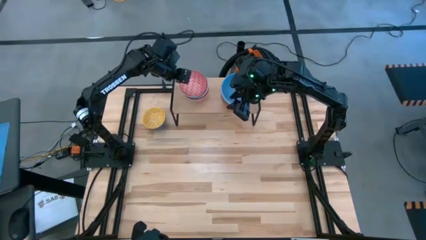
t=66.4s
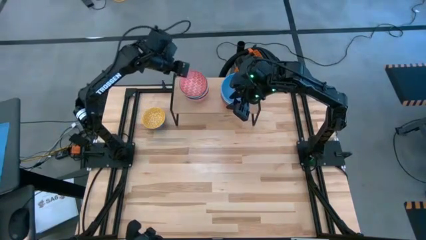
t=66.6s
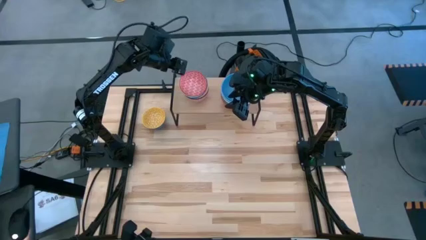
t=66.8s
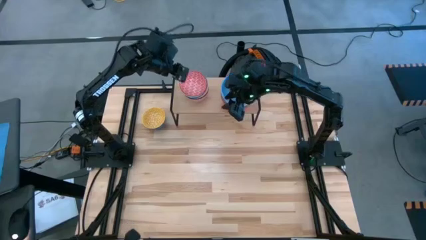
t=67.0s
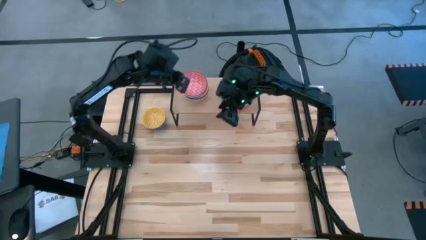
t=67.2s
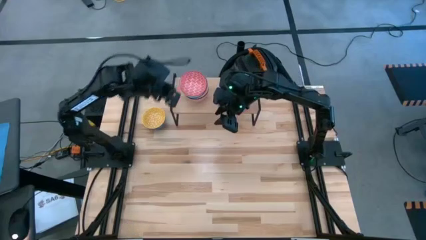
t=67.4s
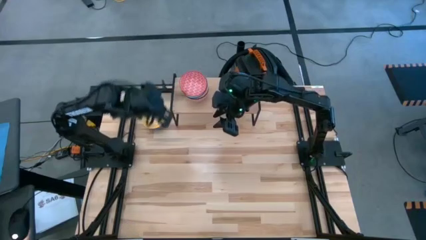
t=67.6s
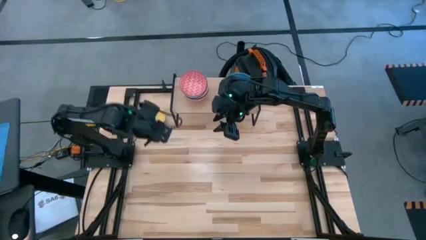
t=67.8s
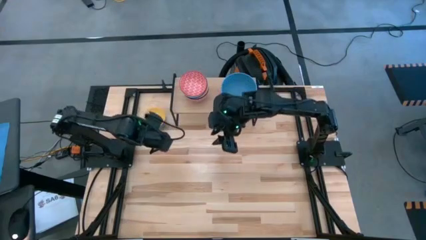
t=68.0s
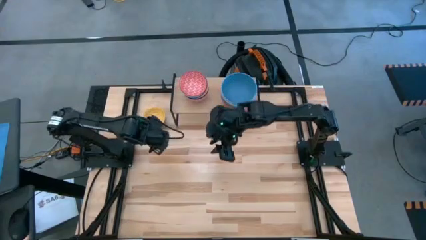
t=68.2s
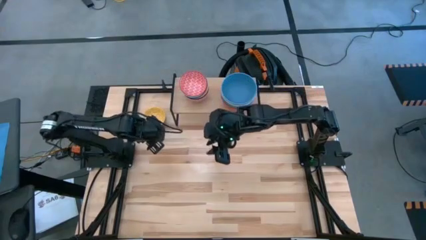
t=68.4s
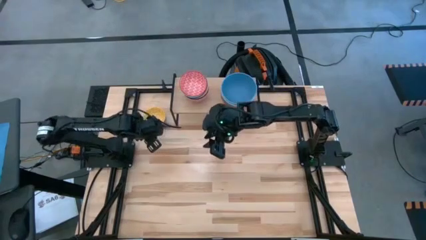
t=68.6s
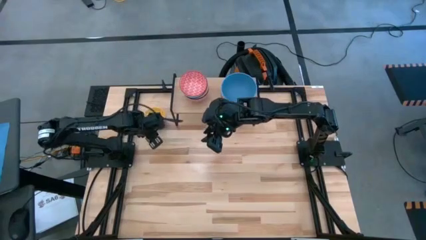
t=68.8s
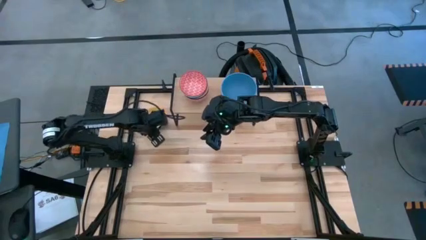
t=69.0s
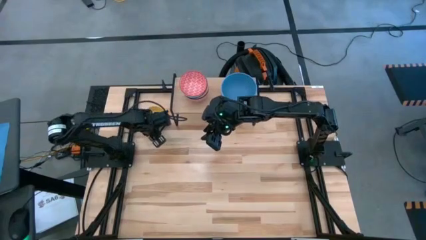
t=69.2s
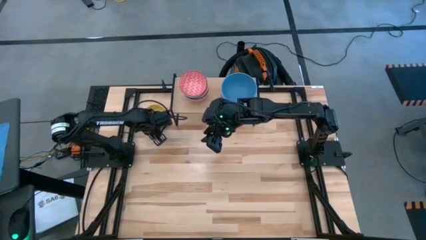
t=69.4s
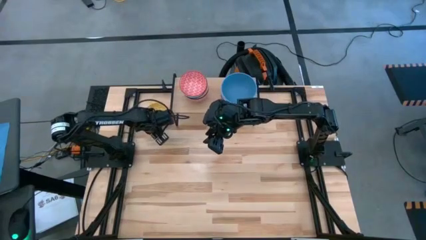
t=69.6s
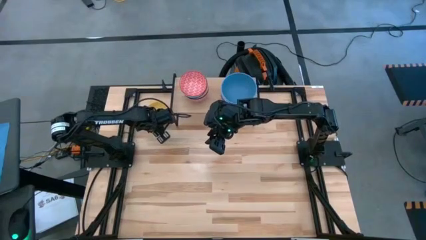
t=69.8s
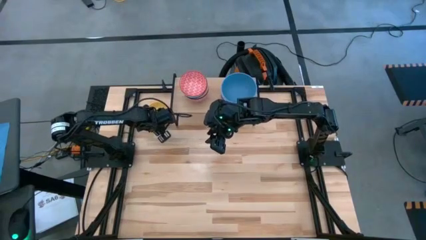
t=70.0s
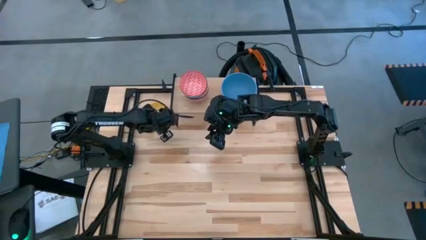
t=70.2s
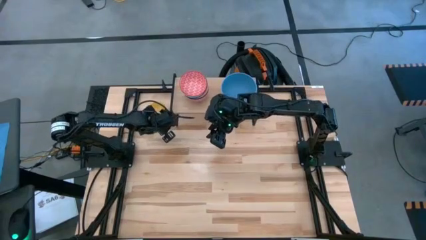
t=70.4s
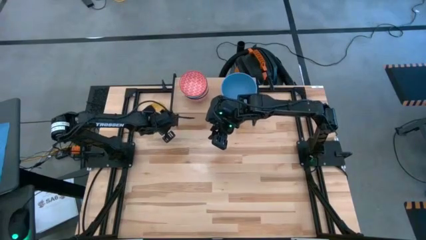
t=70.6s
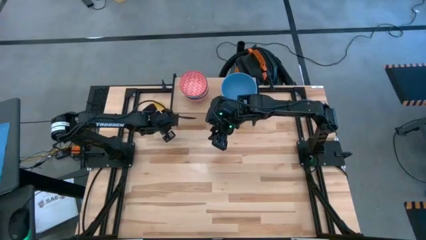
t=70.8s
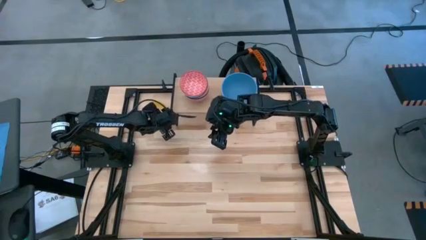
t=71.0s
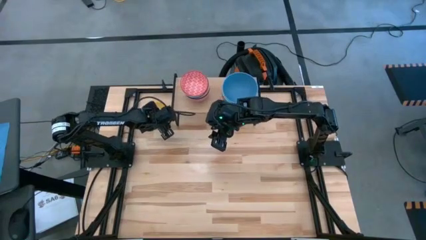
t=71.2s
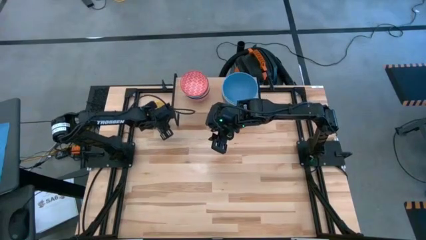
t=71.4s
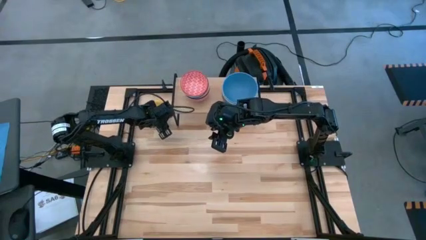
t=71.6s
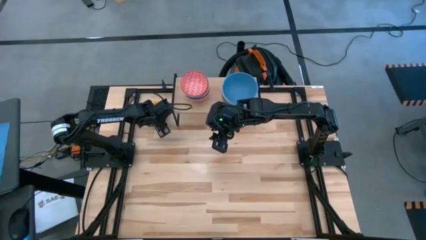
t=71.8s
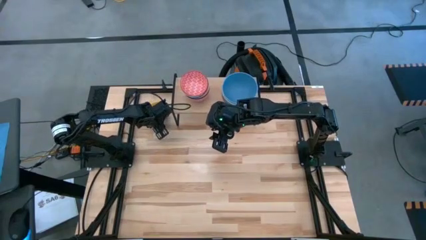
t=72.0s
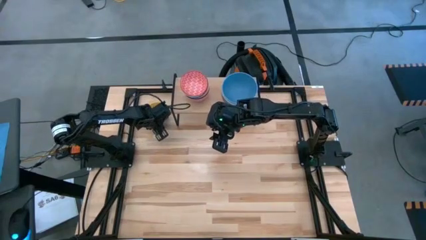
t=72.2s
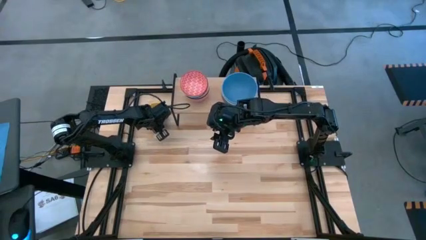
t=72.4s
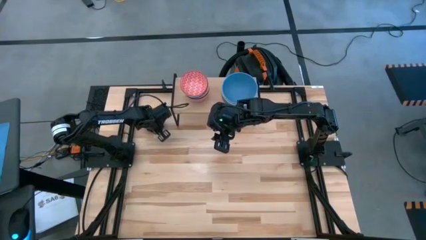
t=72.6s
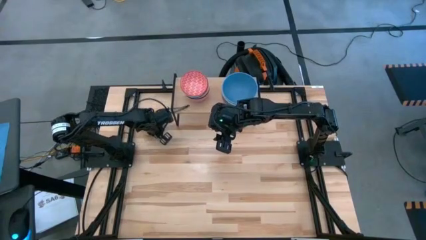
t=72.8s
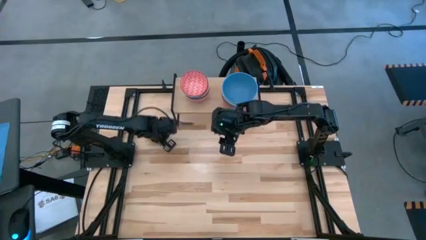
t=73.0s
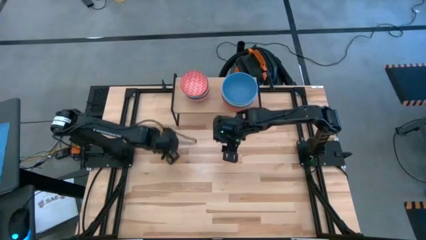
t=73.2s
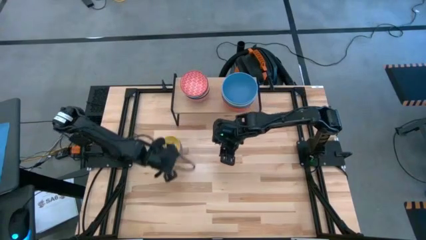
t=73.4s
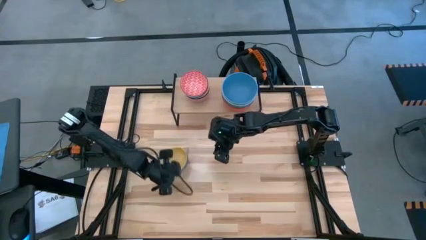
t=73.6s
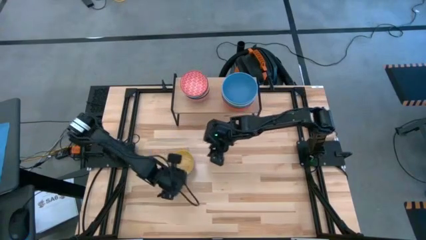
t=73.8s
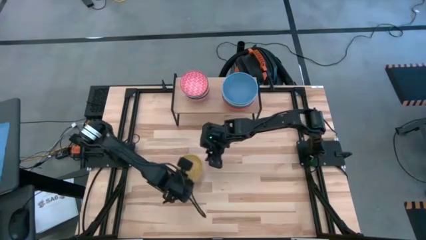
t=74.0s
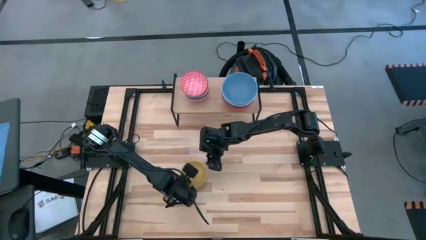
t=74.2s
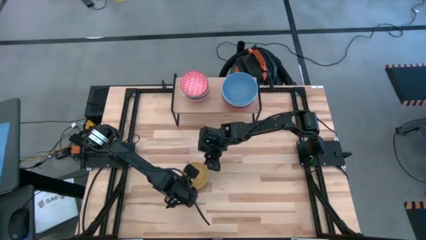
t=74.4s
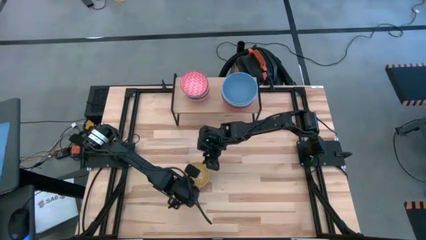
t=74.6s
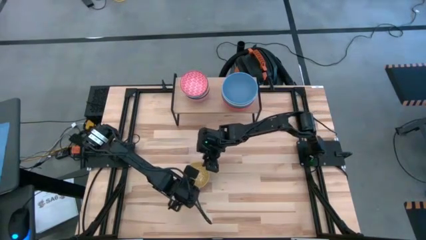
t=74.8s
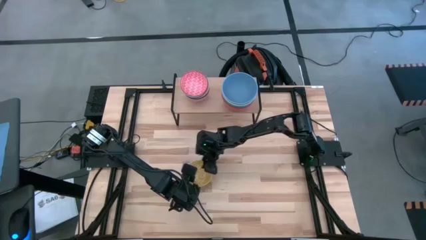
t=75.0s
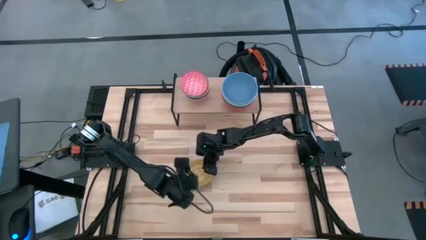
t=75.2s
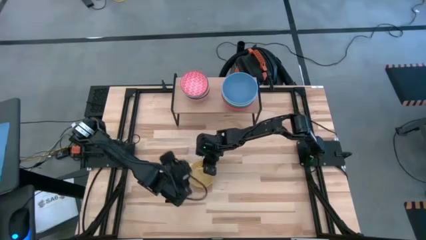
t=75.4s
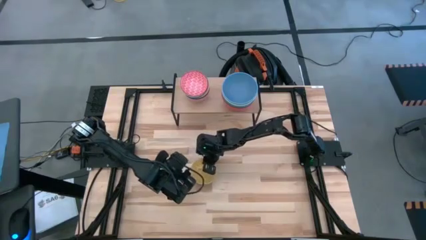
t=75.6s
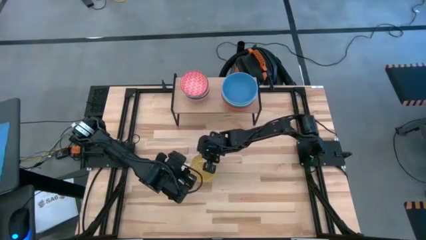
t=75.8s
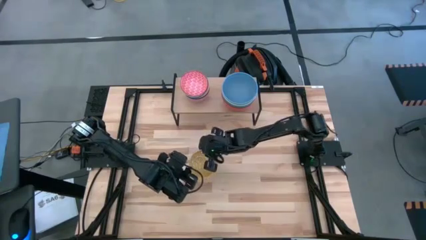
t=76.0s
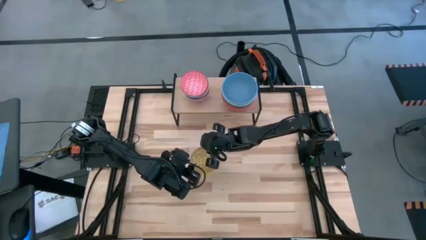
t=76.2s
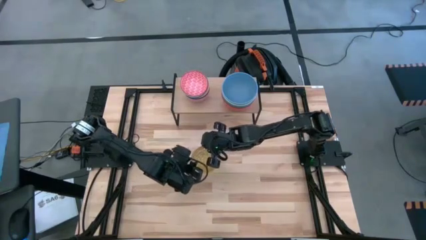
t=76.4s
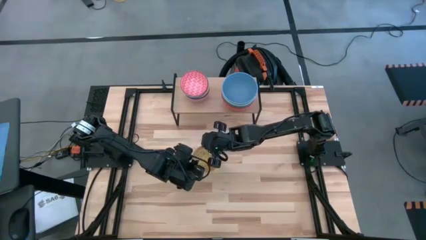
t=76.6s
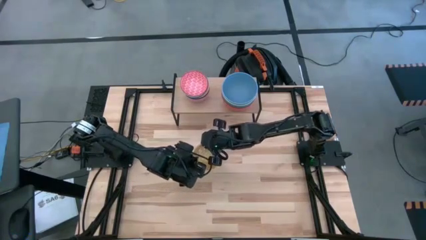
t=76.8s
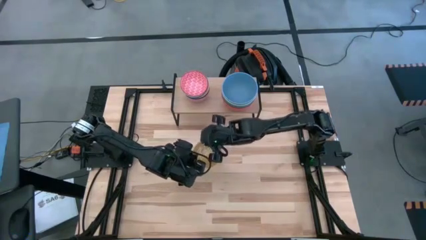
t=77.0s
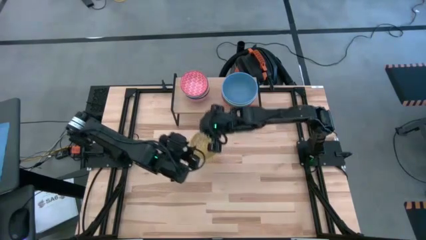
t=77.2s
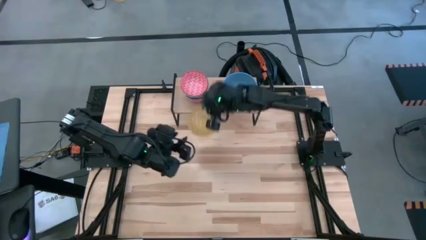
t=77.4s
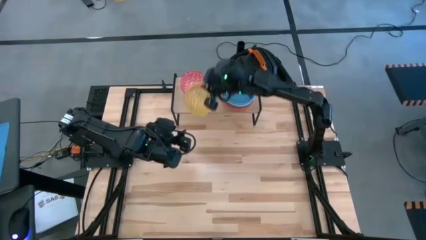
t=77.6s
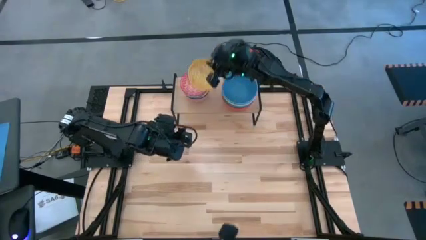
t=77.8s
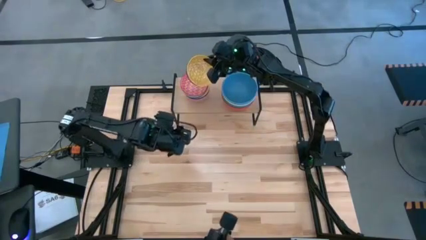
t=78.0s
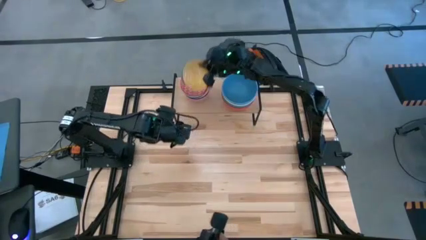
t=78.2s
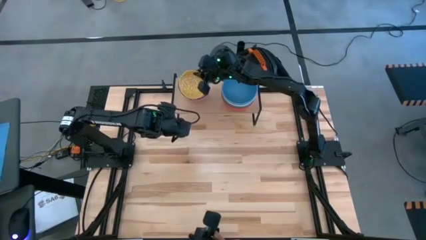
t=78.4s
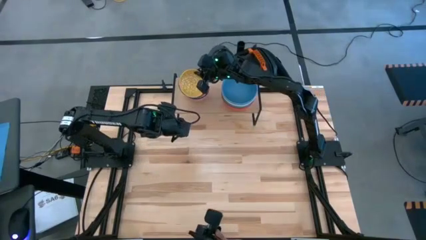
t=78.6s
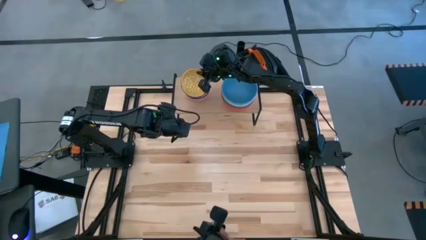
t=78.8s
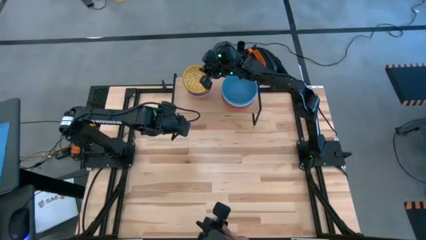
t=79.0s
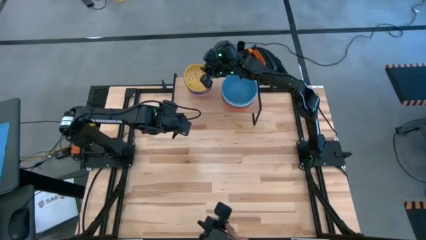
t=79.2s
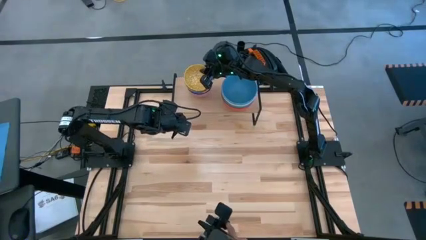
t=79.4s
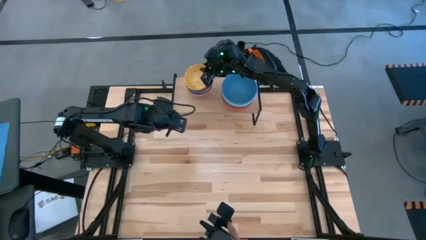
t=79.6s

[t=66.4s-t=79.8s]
Task: Place and stack bowls onto a shelf
Stack the blue-yellow patterned bowl on top of the blue-red patterned bowl on the shelf

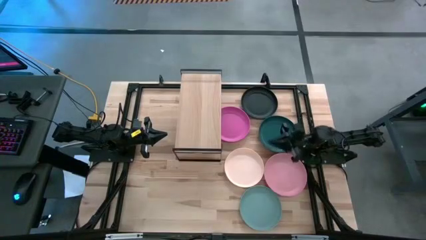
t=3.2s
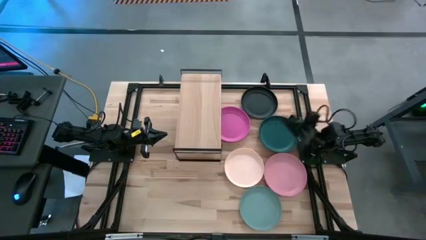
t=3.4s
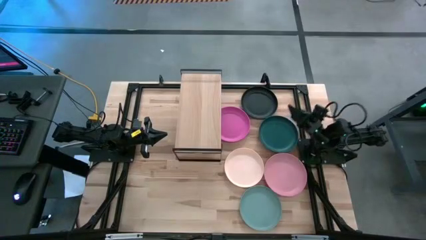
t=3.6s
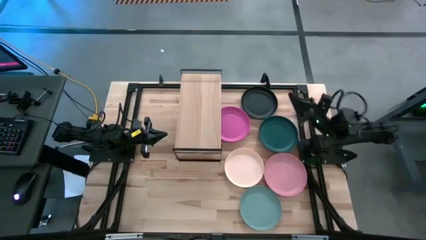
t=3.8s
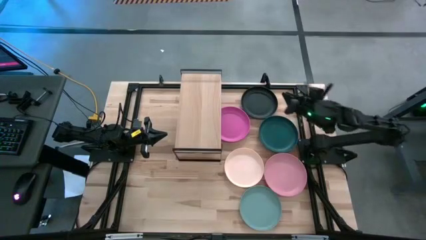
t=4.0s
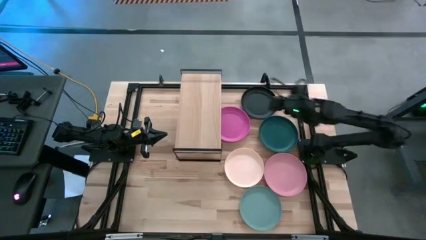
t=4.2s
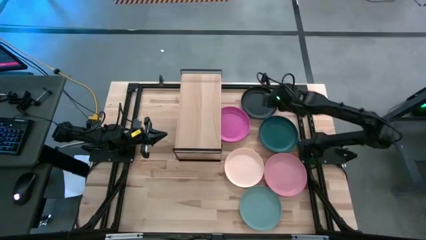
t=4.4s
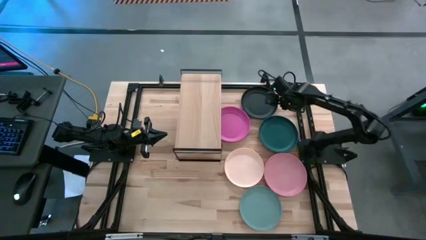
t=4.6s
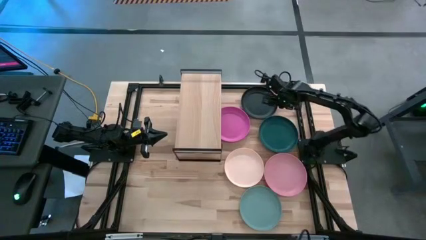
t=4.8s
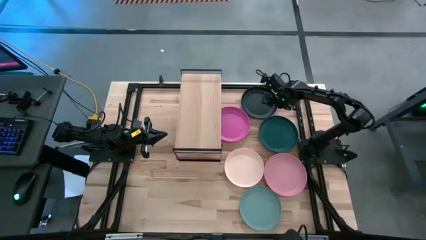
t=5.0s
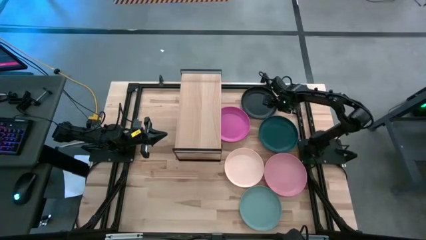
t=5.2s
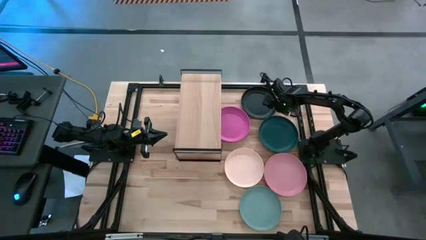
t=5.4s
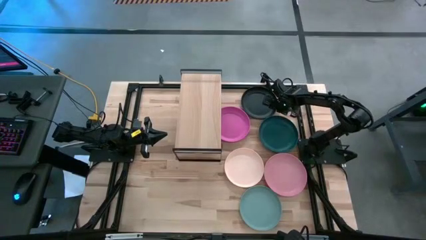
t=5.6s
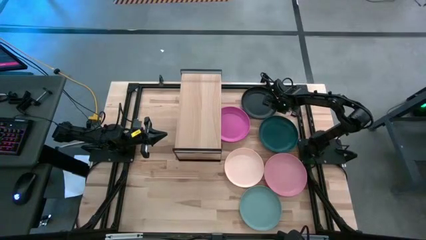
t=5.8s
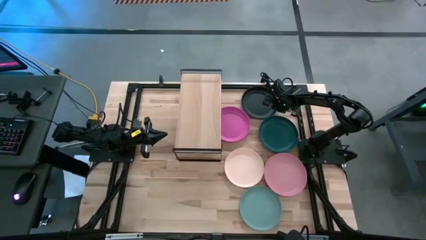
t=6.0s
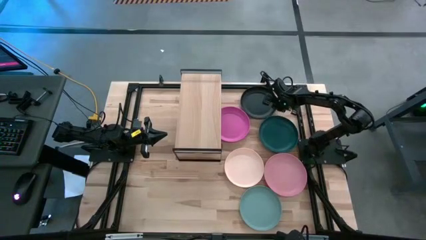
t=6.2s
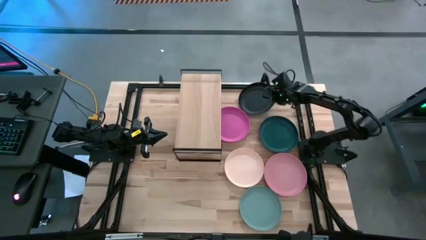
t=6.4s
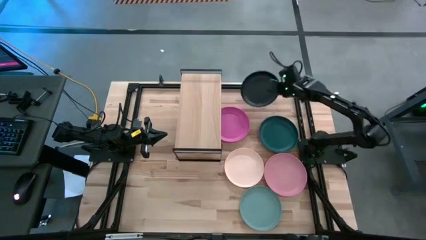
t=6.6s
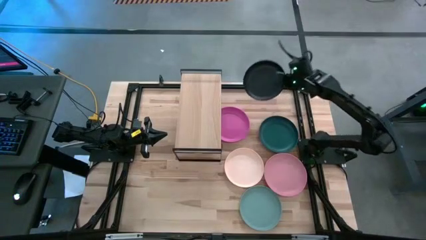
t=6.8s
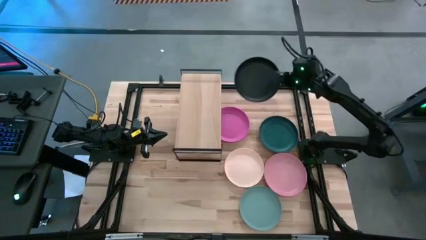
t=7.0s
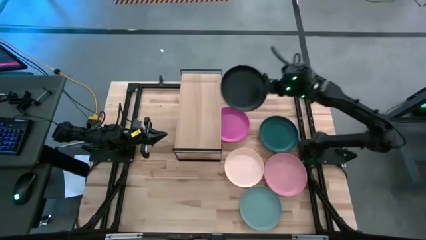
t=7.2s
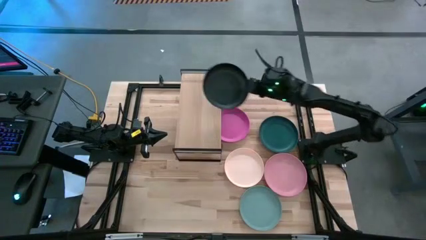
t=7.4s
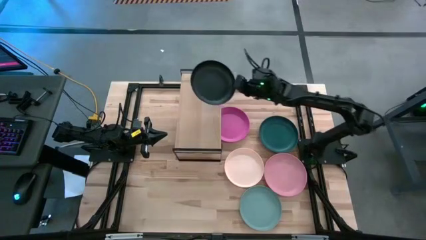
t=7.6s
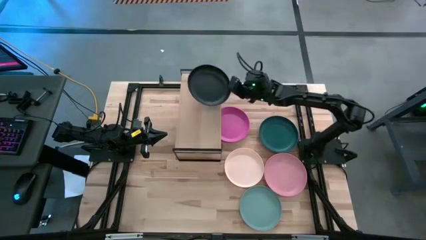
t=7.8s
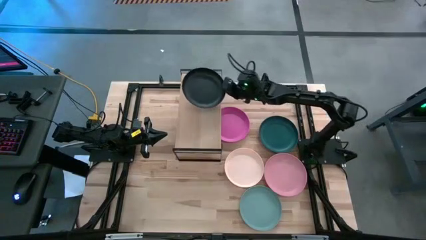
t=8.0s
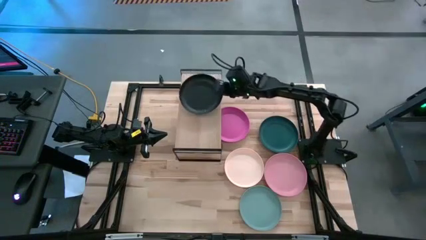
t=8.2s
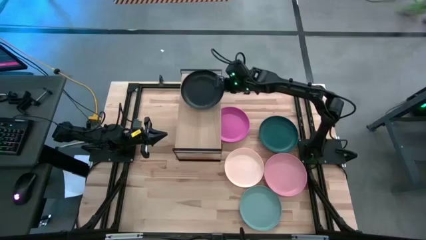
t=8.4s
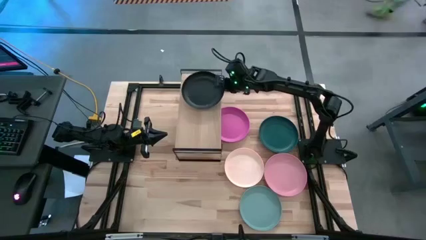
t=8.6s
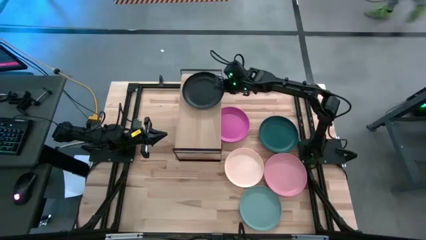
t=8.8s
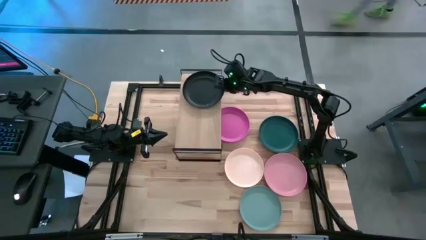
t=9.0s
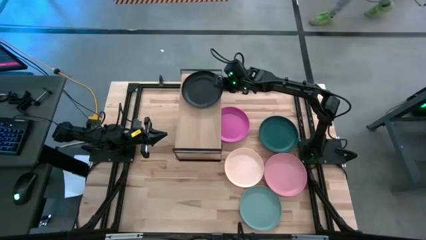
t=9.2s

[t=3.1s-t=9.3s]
Task: Place and stack plates onto a shelf
Put the black plate on the shelf
